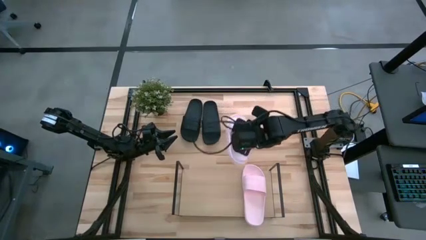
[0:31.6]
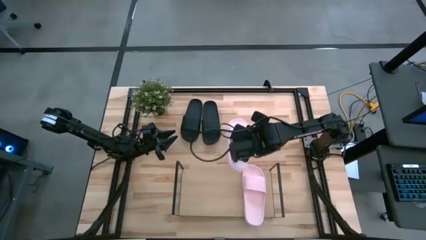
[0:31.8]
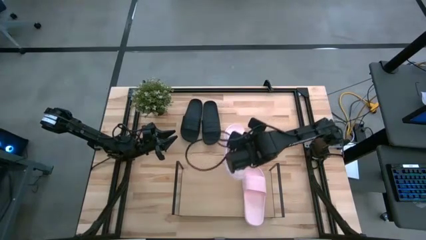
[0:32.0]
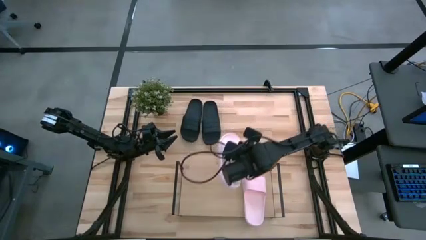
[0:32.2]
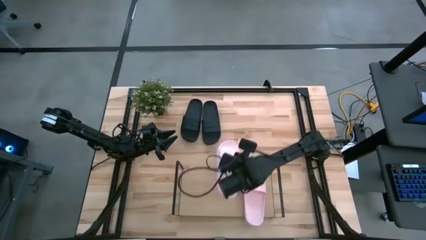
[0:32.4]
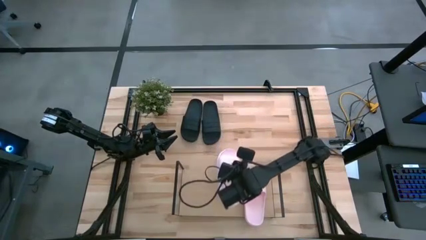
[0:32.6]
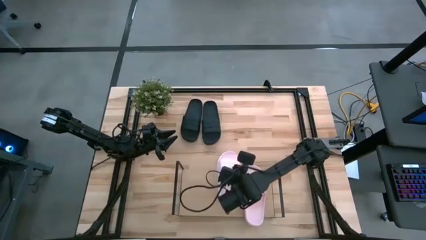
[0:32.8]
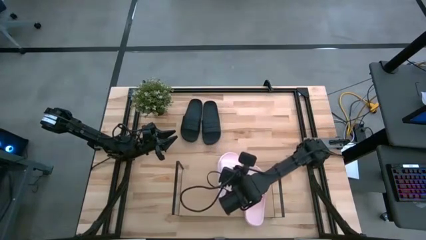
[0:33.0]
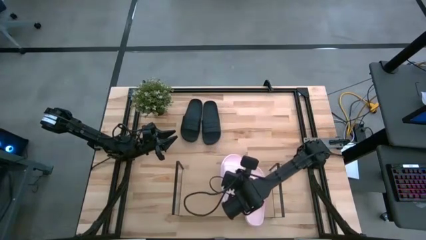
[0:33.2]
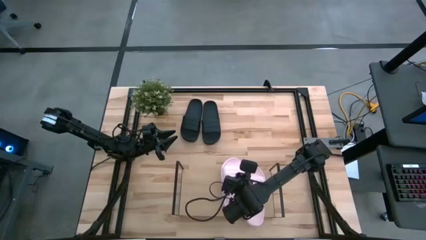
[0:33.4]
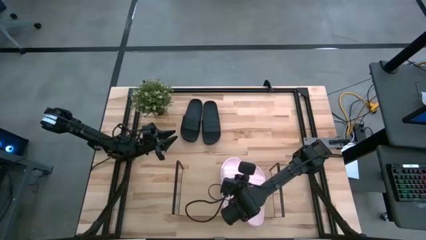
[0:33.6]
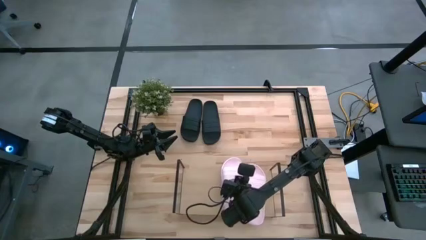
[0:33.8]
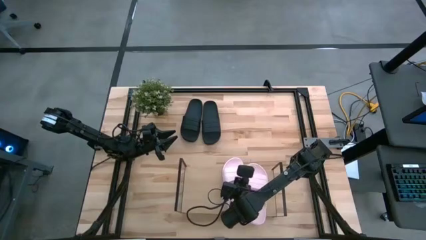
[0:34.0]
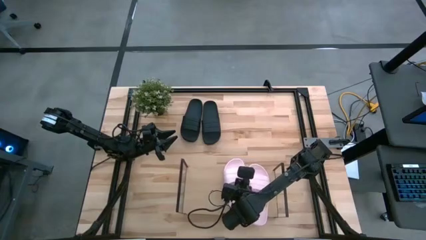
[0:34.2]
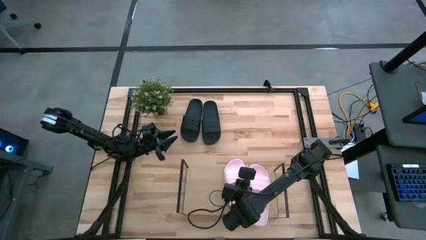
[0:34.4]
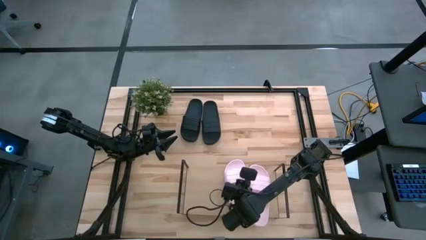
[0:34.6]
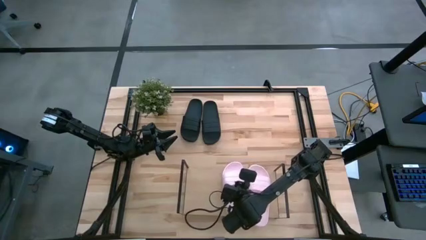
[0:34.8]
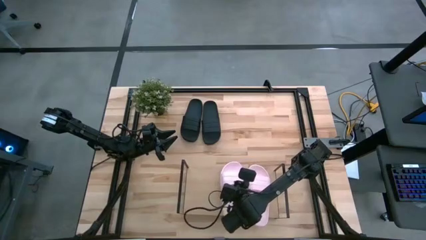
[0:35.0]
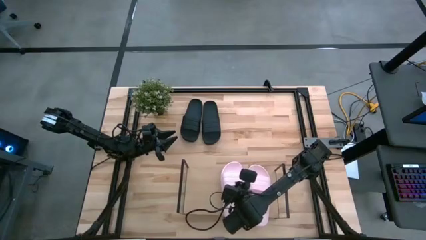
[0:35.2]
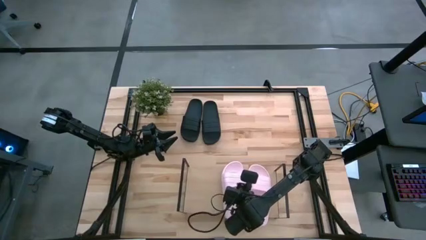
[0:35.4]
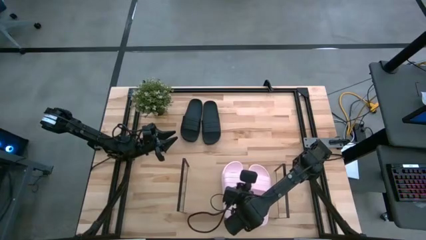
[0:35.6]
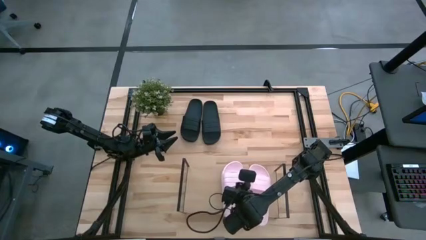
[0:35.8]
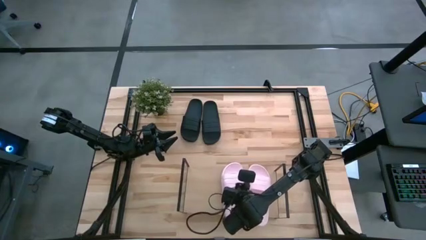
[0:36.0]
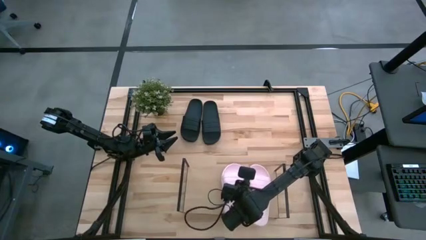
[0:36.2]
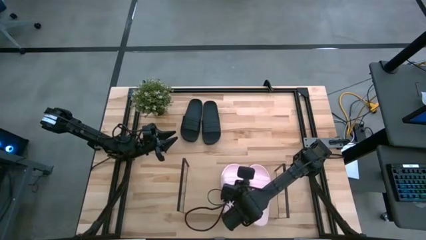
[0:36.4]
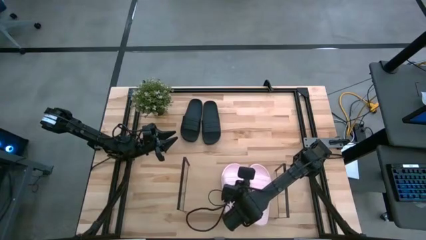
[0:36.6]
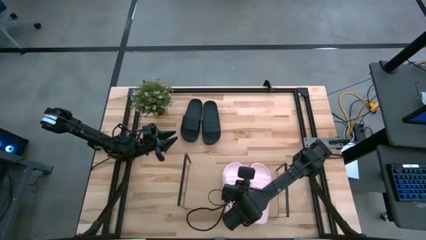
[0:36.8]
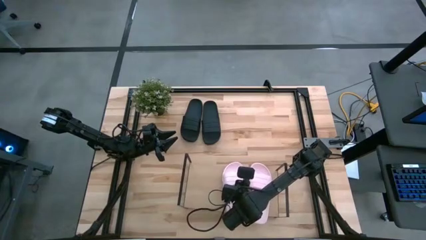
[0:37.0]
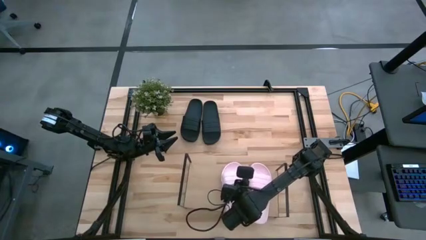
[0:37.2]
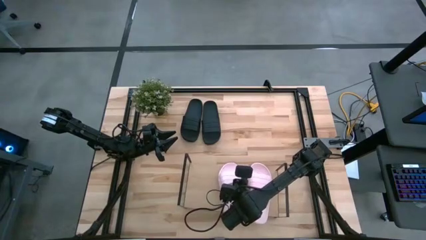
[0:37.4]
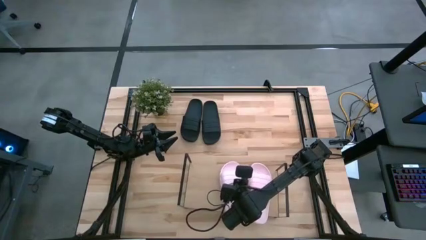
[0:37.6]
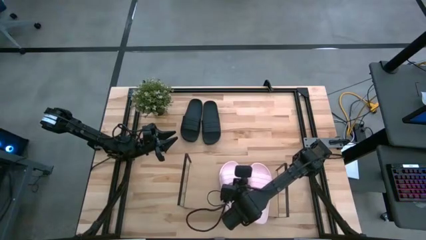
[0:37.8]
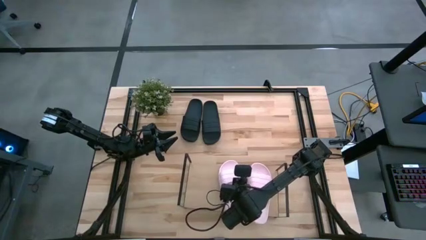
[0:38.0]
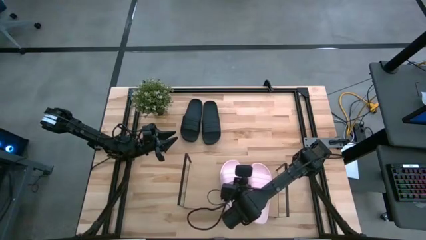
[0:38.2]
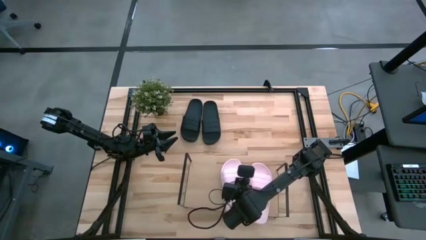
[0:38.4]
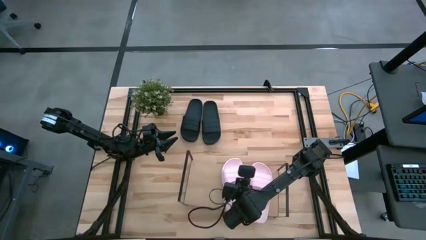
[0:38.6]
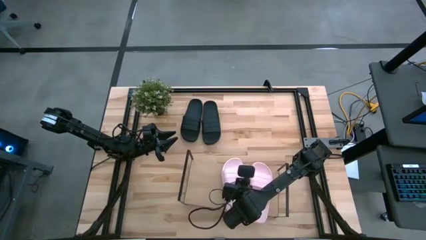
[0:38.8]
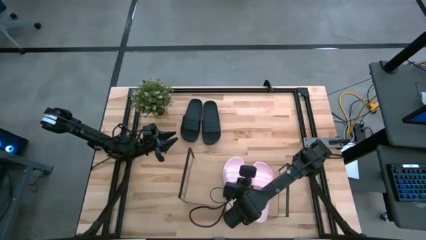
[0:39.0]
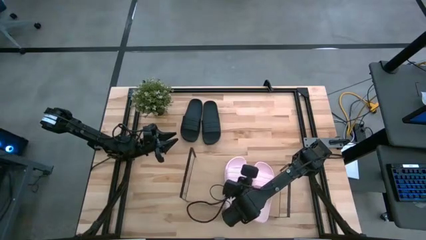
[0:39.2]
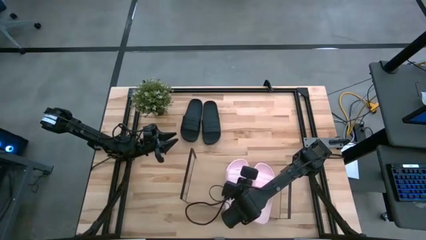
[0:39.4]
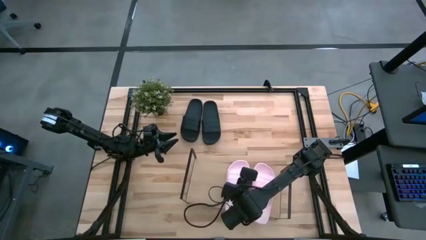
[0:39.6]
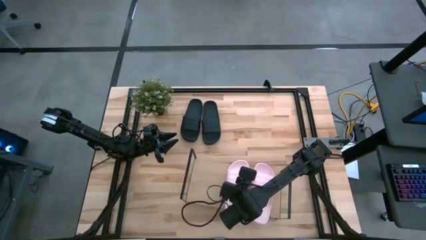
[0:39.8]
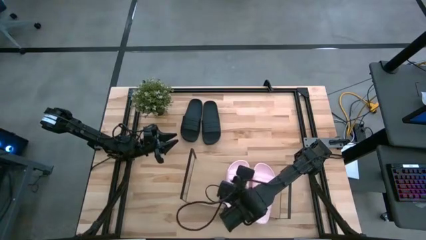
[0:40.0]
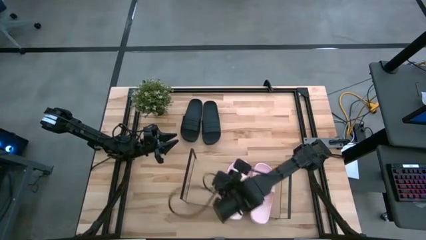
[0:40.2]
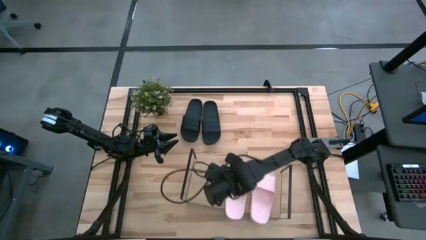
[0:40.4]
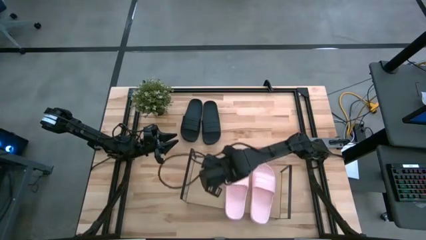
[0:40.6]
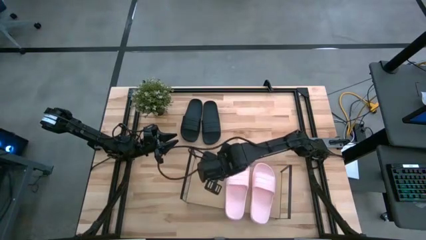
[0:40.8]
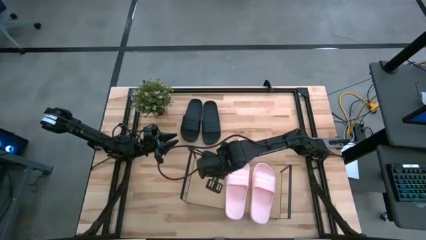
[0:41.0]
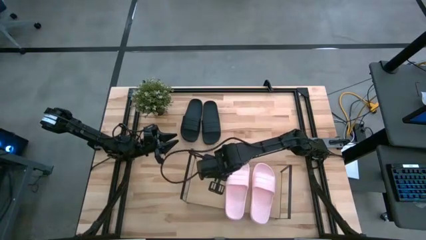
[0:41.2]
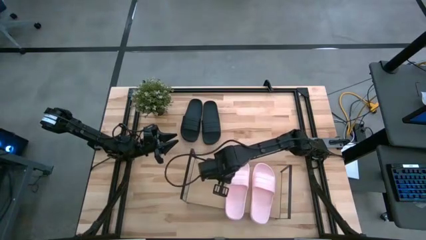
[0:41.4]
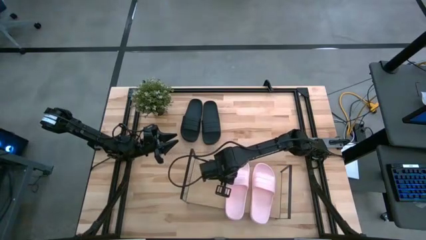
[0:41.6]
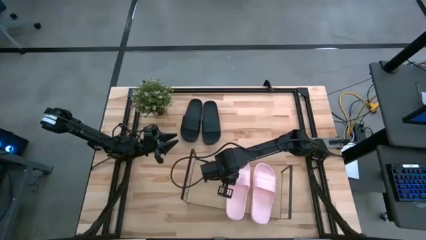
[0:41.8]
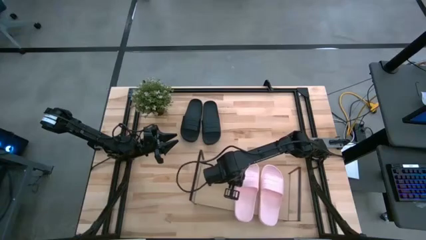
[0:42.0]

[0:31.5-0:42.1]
Task: Pick and place slides into the shelf
Put the pink slide on the shelf

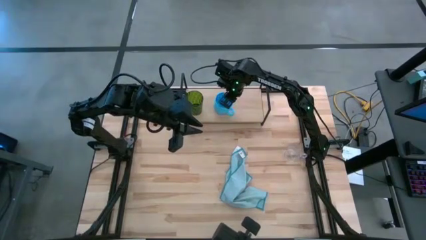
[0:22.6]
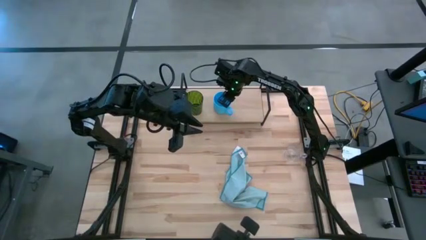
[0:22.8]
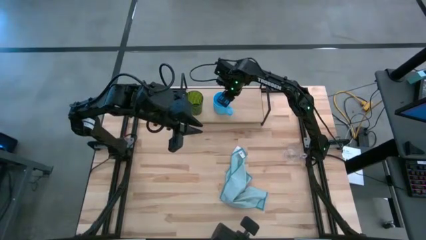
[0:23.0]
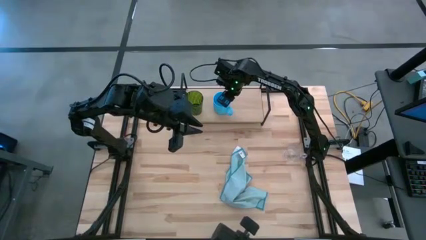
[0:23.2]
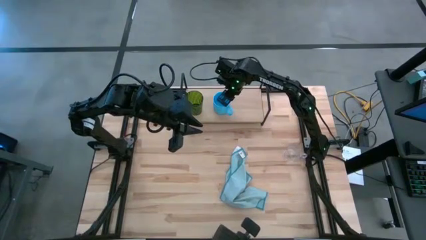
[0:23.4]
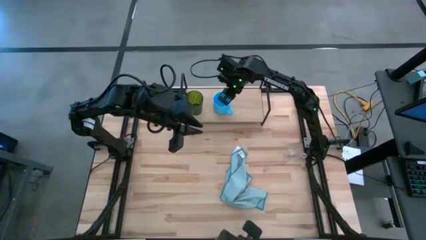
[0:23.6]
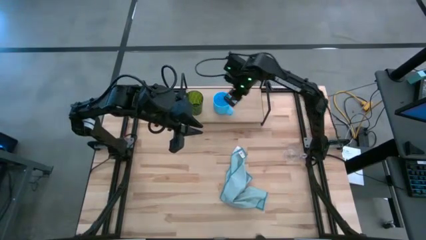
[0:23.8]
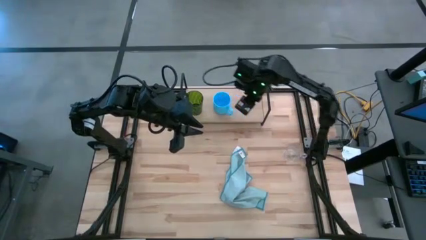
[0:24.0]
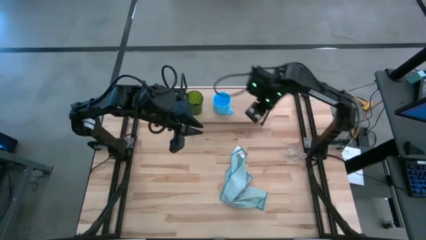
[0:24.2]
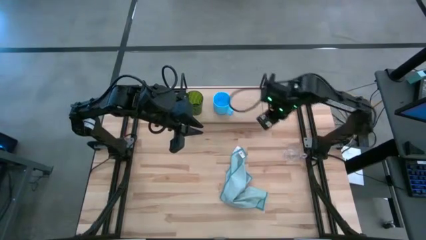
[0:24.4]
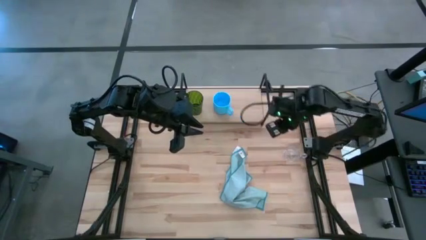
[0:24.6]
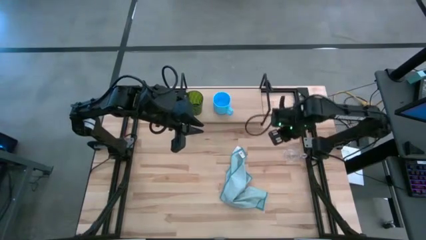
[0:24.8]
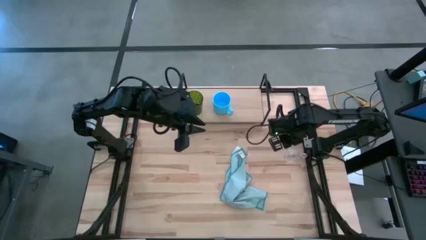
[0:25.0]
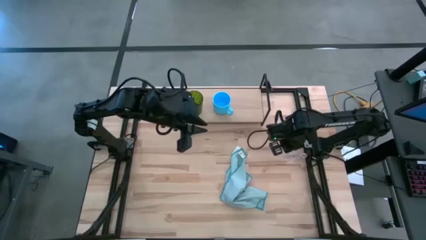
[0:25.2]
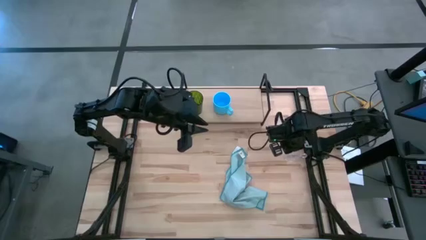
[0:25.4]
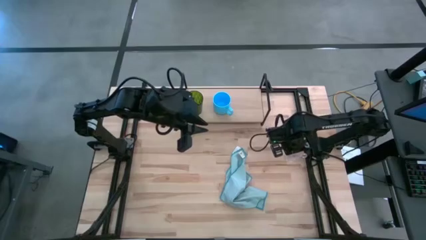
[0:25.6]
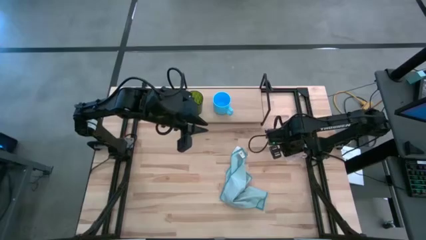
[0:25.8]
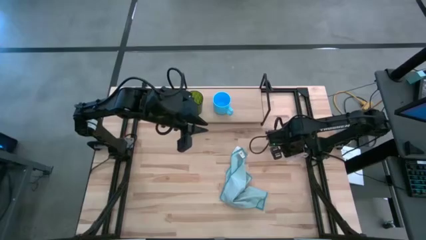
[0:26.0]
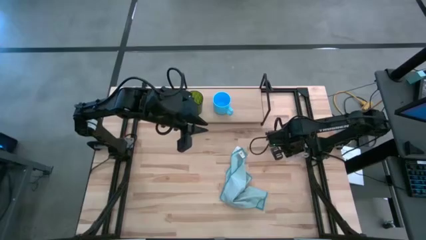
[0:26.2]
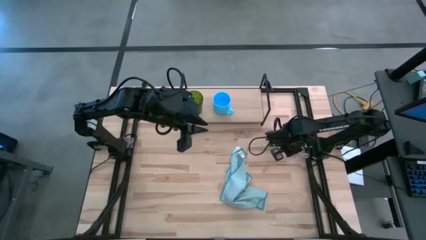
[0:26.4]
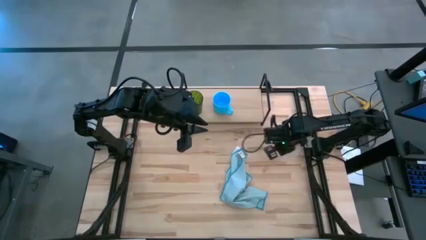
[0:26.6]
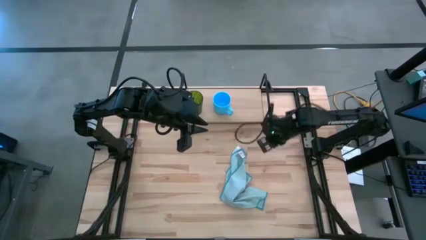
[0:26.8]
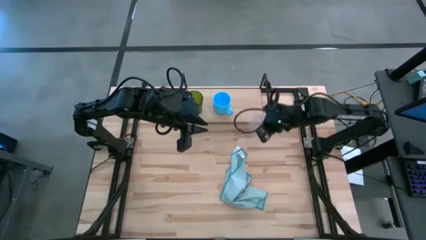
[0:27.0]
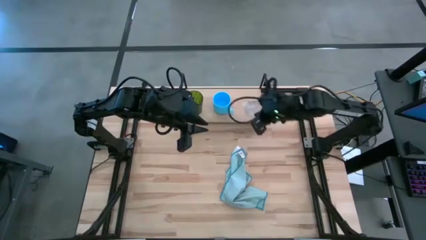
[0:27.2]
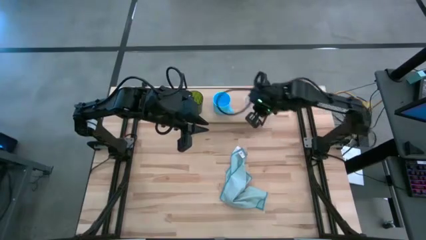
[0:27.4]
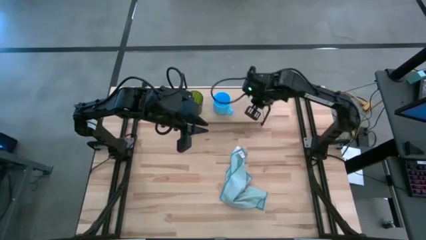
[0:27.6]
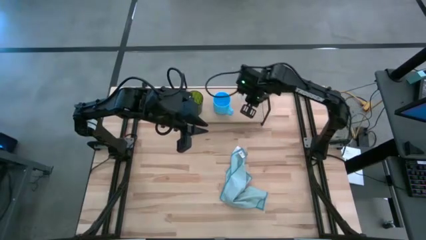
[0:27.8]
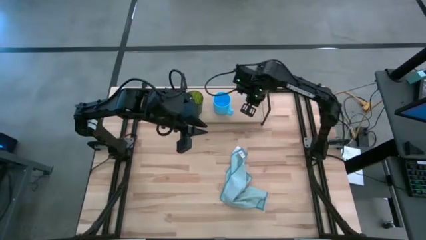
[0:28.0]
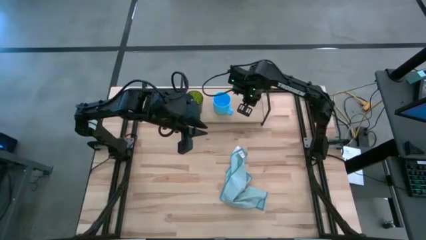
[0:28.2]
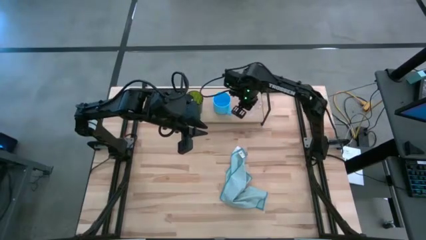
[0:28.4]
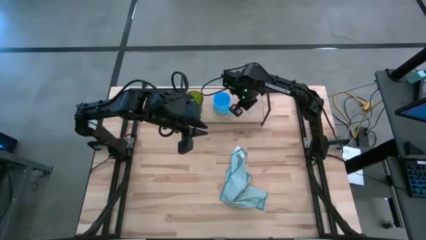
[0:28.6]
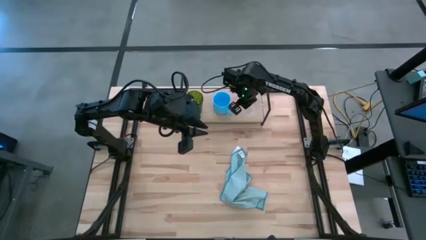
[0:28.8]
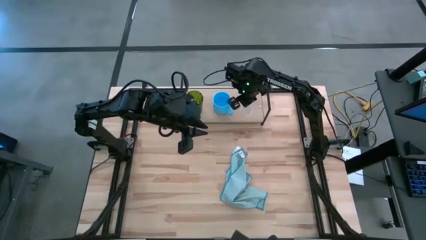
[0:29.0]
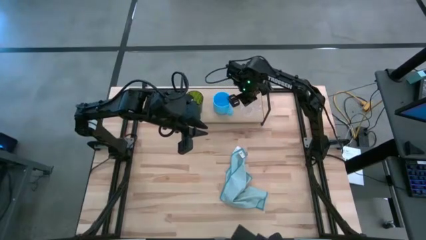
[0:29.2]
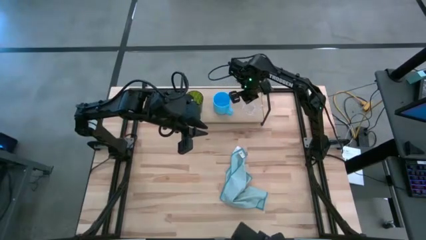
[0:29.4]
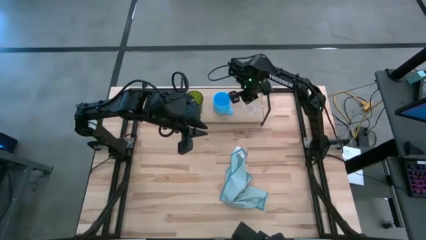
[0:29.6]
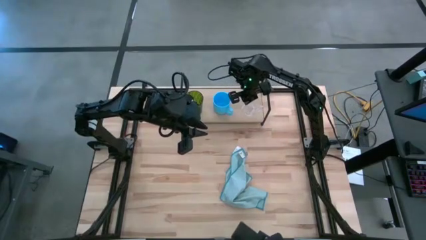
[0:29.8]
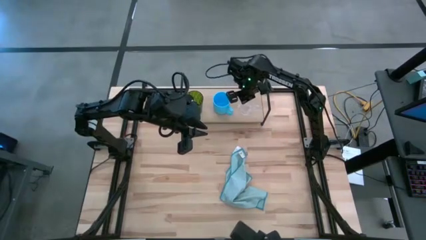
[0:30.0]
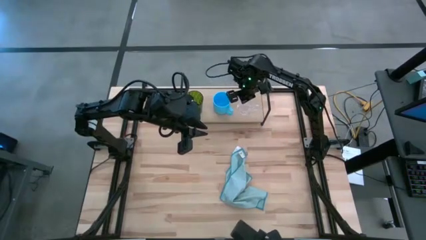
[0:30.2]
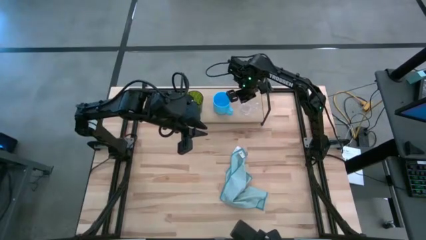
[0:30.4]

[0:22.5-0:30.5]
Task: Stack small to large cups/mugs on shelf
Put the transparent mug on the shelf
